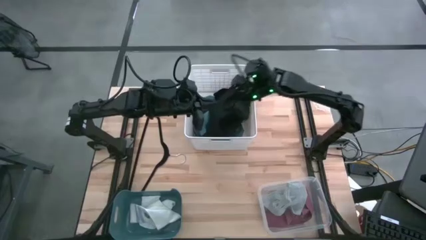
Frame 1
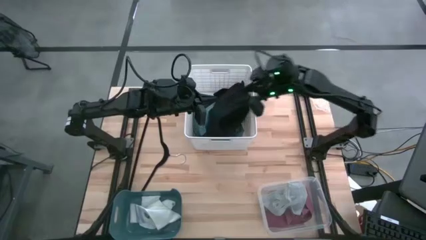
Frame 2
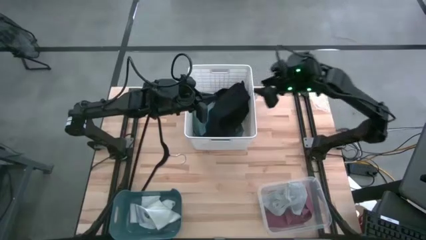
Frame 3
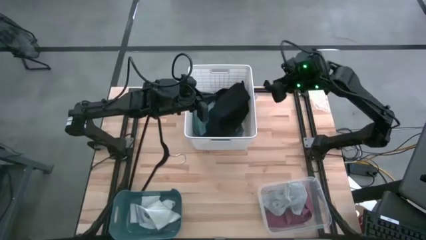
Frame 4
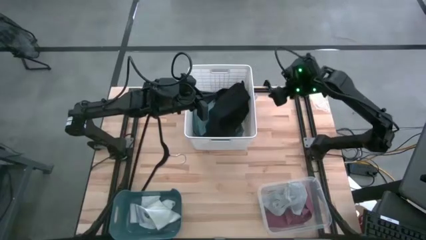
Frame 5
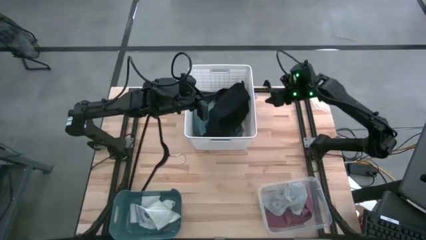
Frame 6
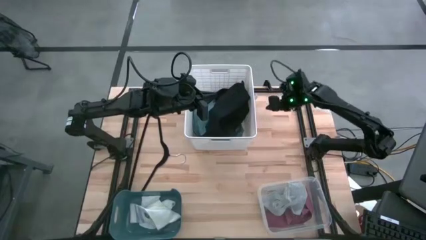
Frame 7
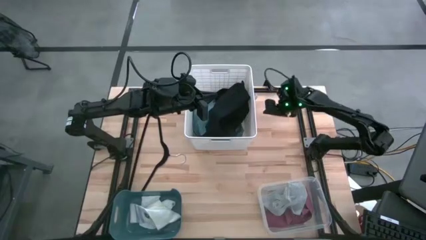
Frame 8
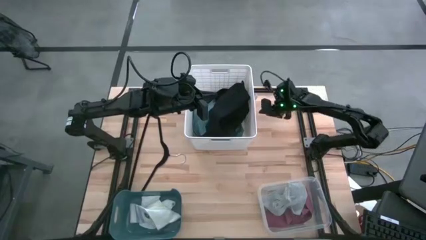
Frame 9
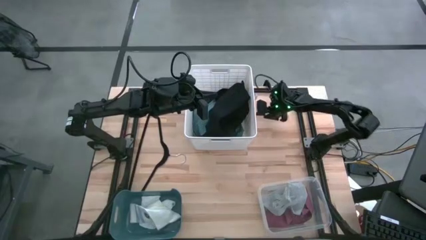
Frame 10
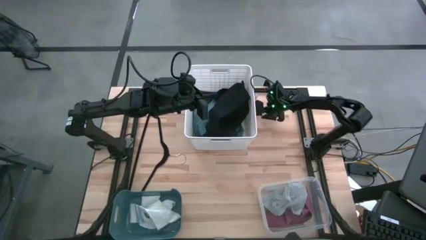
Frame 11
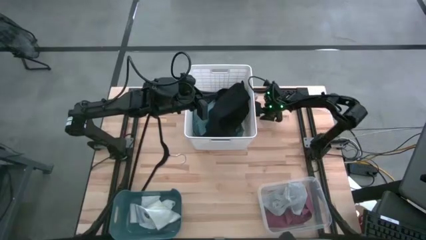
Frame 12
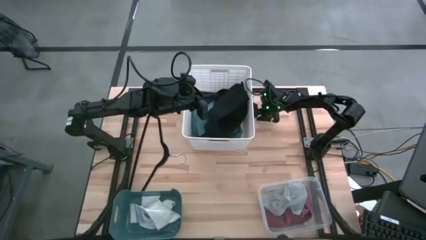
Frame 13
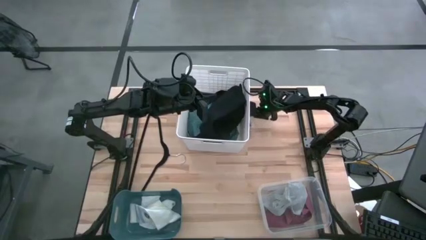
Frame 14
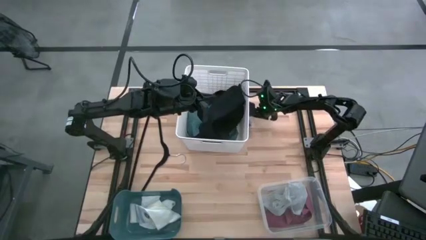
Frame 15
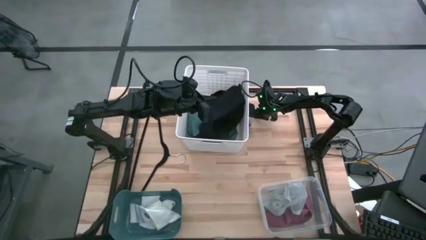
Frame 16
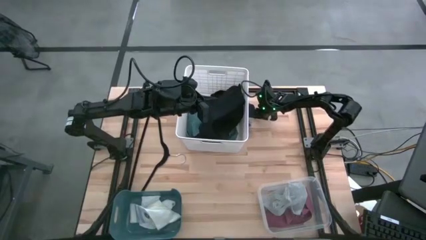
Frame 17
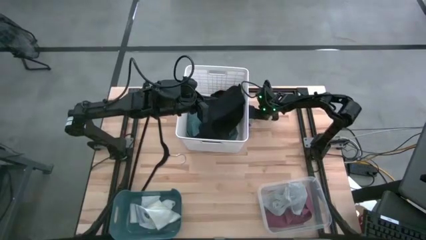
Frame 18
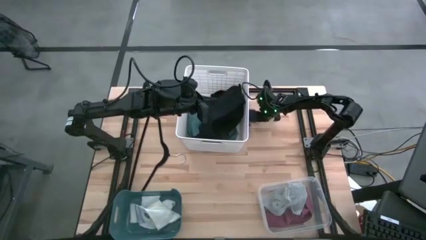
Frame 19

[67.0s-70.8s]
Task: Pick & Place Cloths
Put the gray sock into the dark blue bin

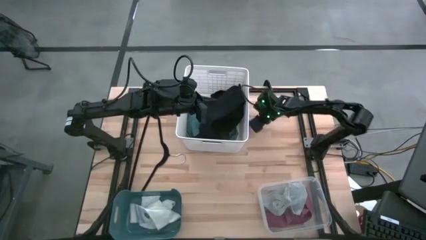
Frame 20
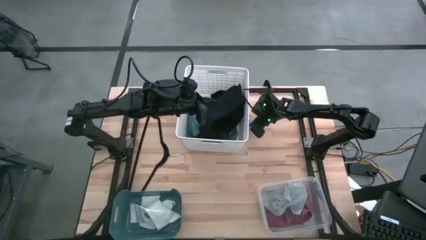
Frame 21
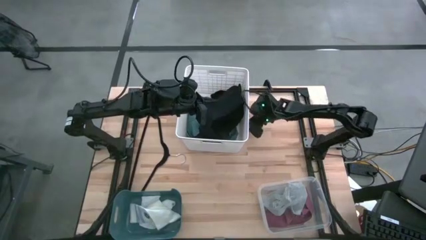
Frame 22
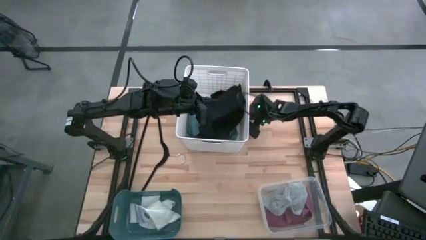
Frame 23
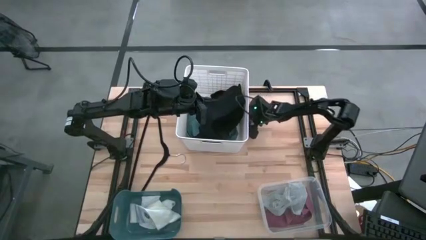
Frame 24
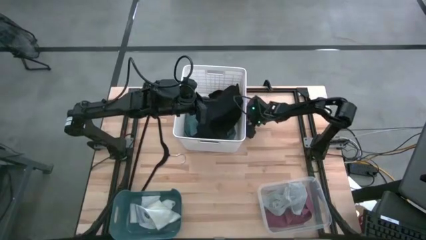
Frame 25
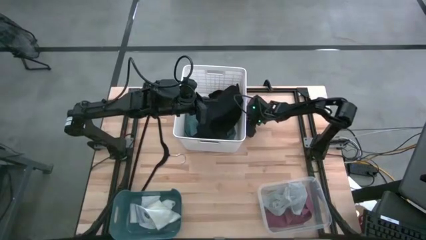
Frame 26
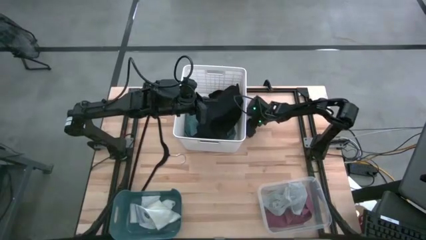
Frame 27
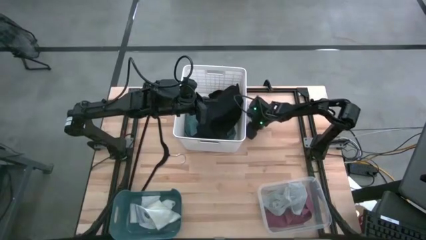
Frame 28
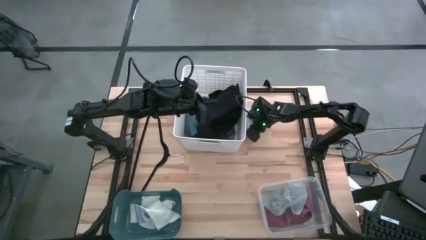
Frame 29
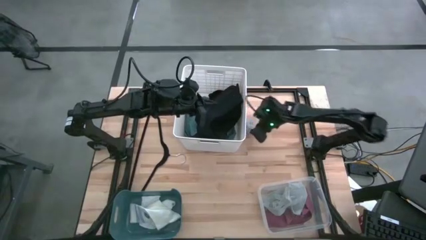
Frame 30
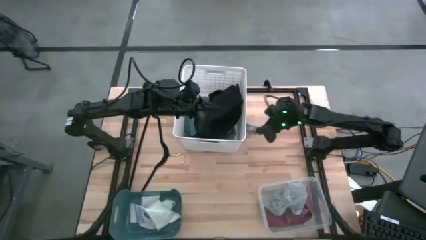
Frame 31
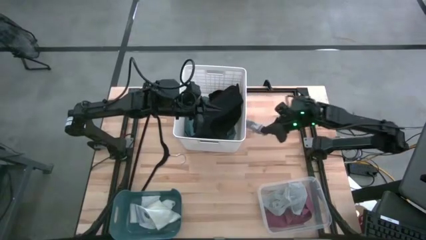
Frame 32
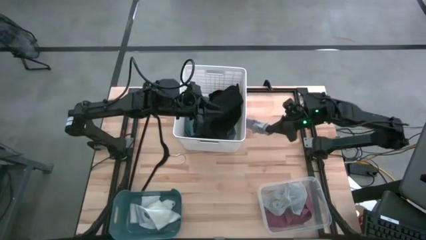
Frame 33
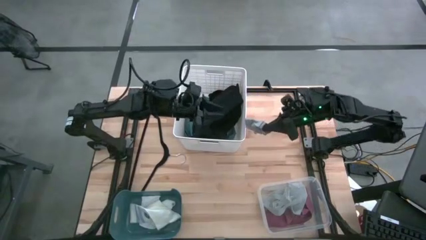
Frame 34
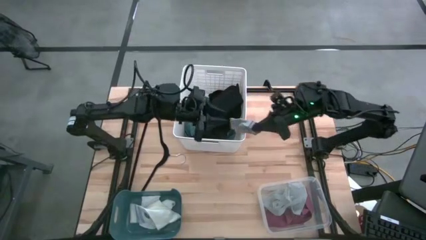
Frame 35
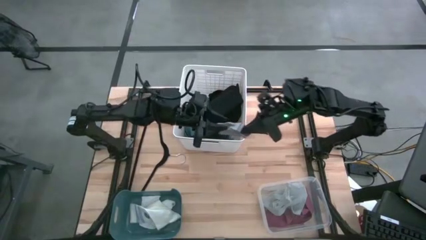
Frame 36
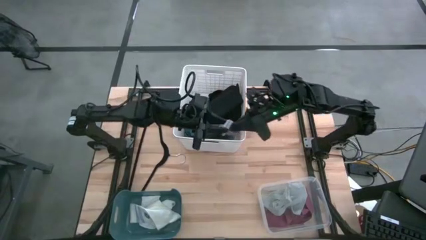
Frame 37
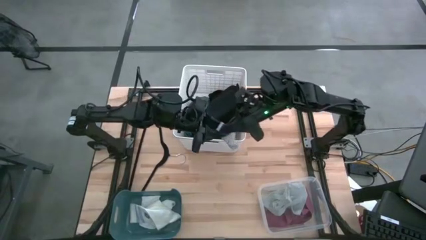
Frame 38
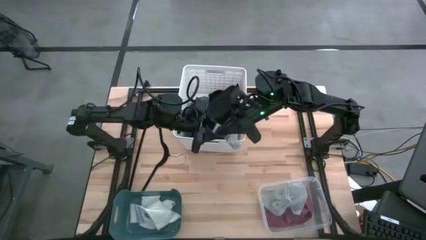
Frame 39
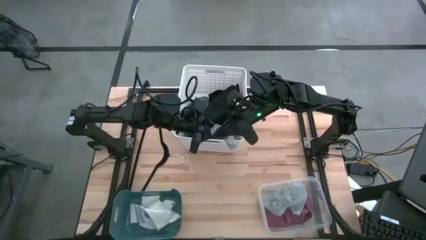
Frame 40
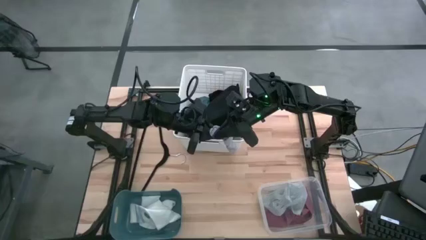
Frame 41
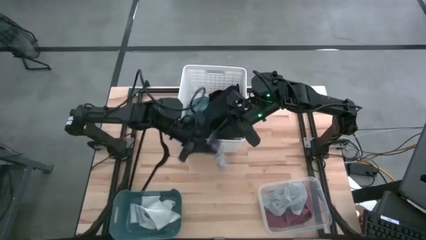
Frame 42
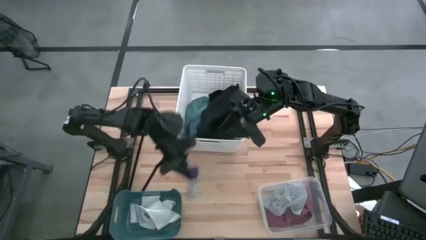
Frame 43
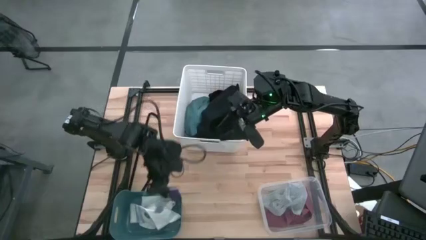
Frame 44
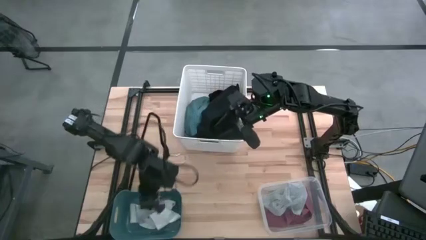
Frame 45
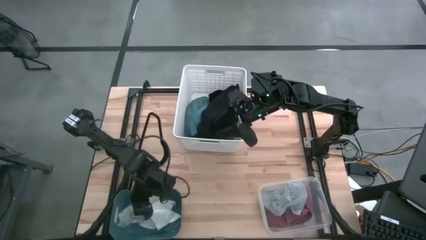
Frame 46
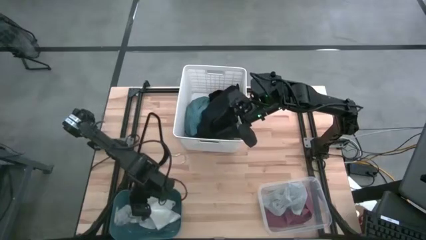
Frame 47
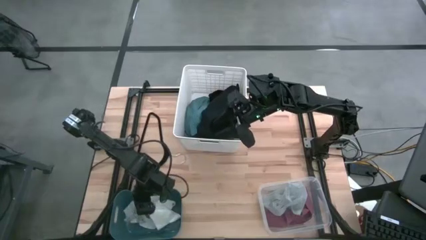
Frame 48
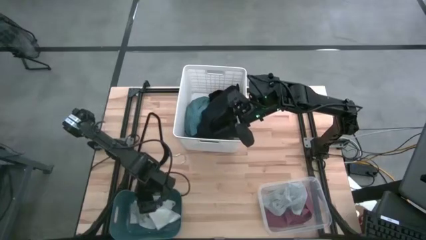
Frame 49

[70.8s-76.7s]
Put the gray sock into the dark blue bin

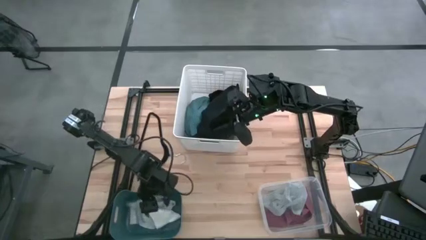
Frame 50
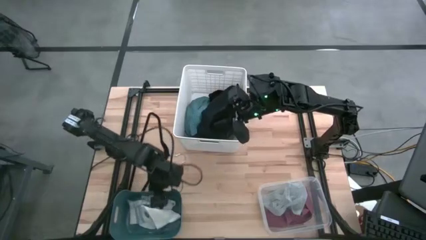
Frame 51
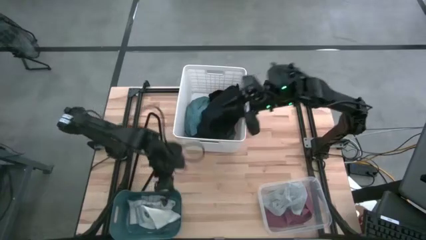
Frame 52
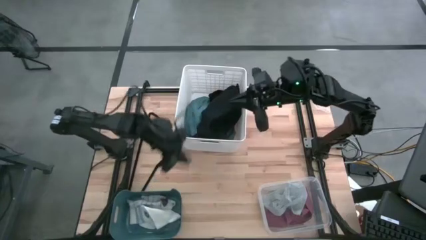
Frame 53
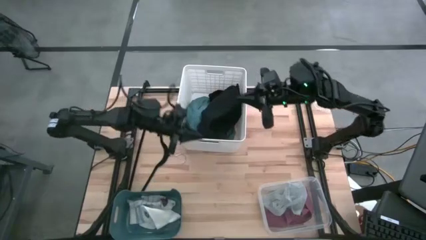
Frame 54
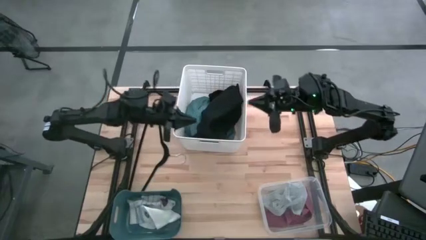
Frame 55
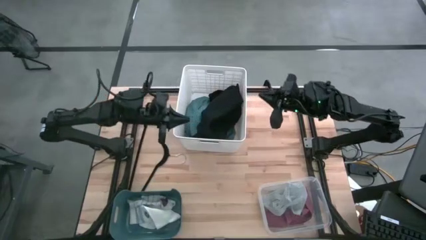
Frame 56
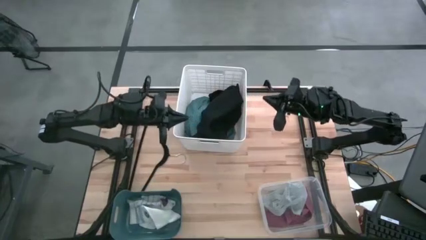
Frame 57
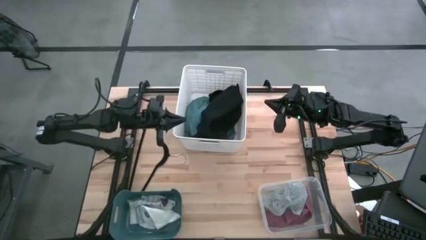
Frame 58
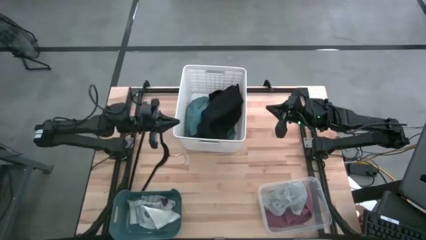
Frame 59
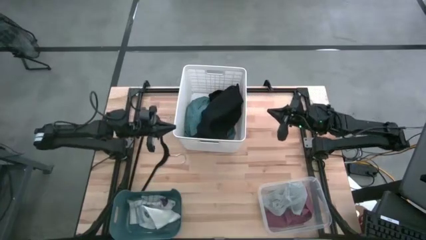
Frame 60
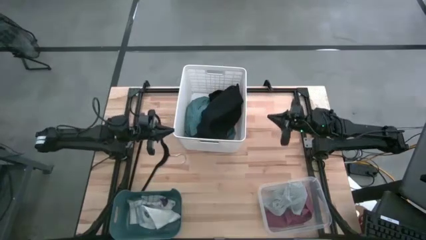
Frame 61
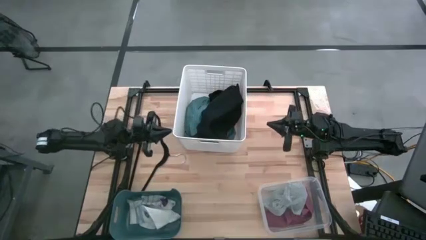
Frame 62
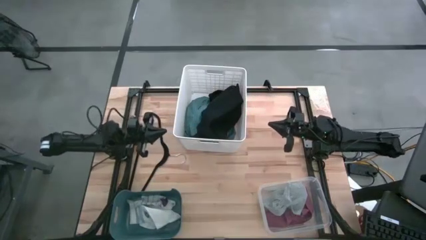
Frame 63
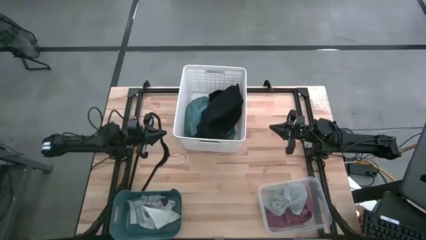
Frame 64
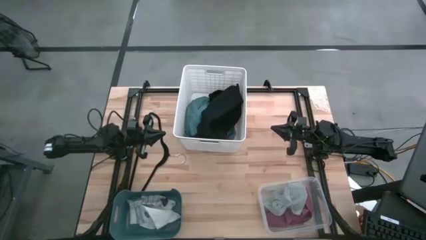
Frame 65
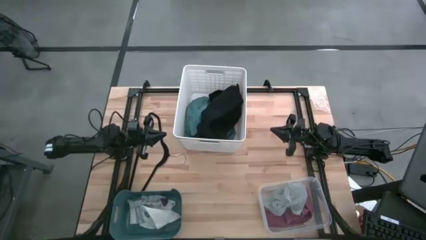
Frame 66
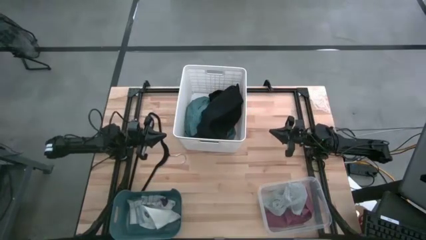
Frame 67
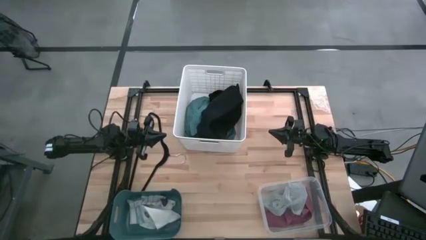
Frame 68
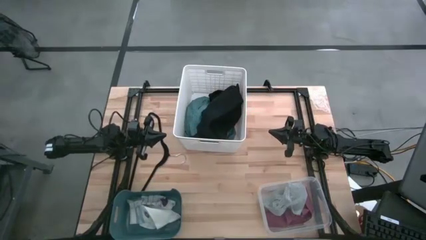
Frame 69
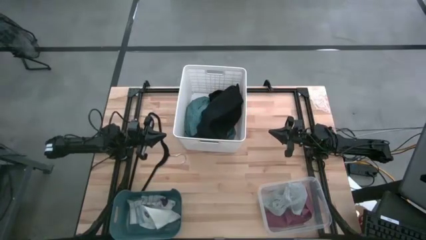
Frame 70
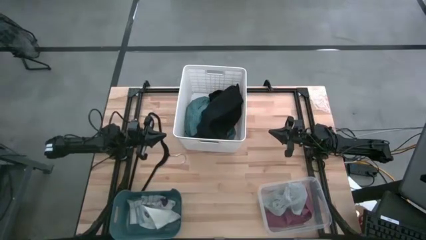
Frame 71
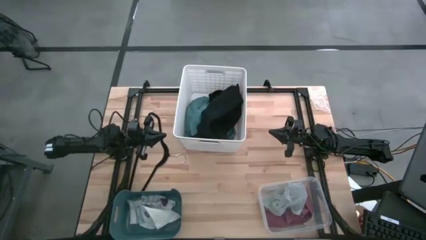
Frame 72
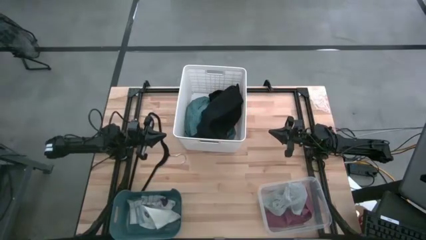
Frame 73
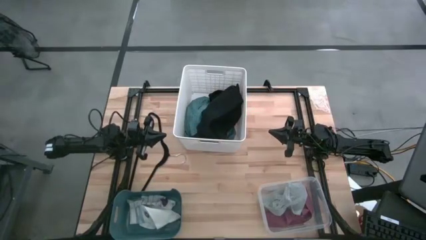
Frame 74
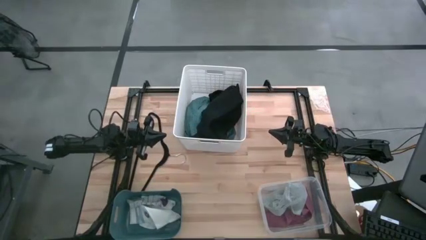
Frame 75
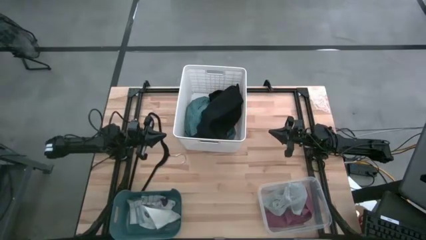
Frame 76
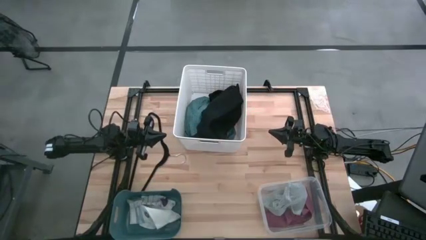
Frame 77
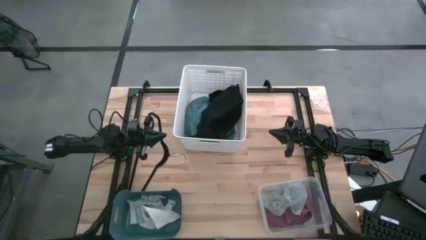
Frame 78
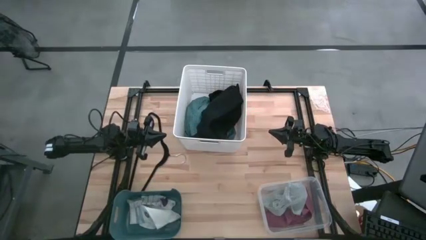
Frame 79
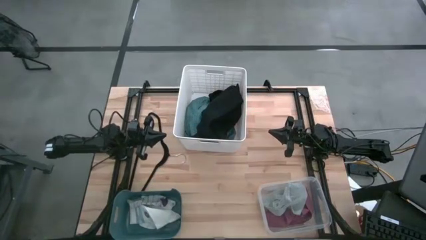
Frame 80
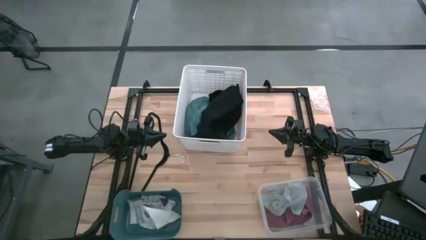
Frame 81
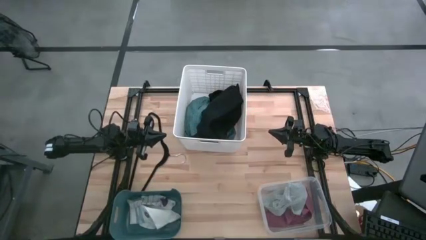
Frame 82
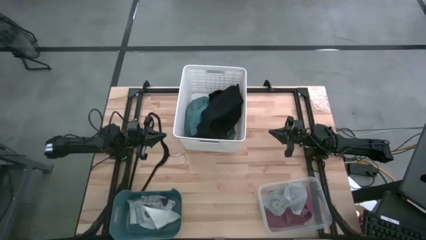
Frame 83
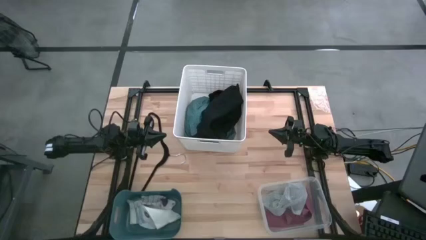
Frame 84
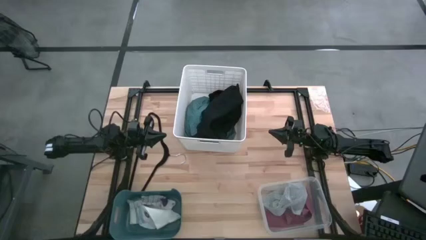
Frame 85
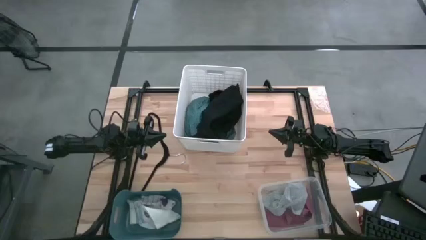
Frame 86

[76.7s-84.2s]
Return to Home Position
